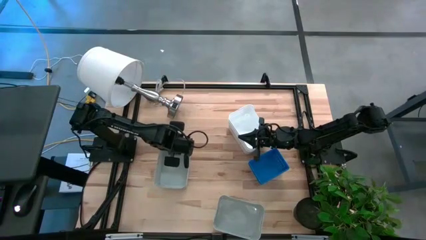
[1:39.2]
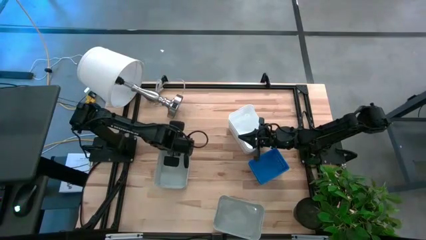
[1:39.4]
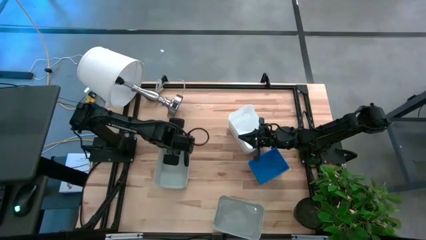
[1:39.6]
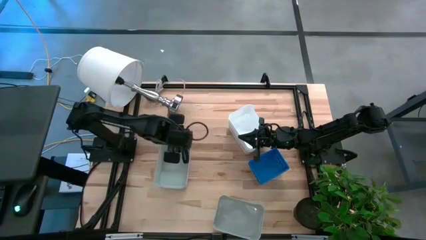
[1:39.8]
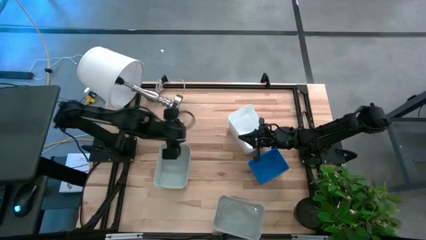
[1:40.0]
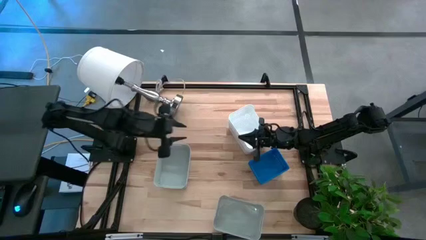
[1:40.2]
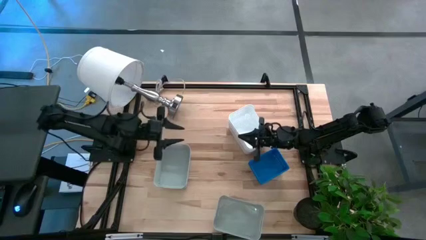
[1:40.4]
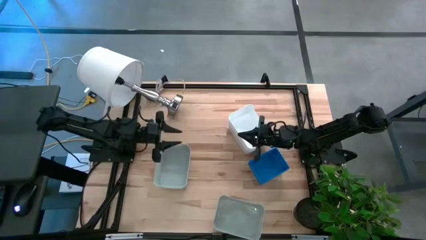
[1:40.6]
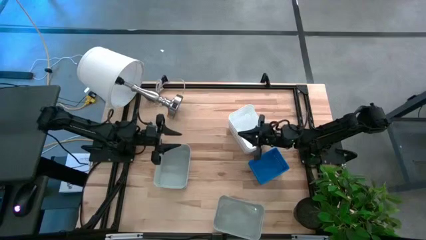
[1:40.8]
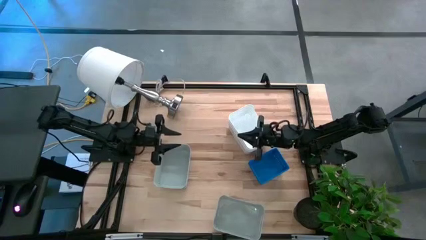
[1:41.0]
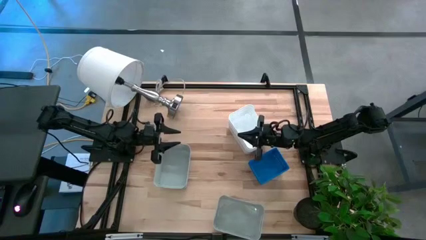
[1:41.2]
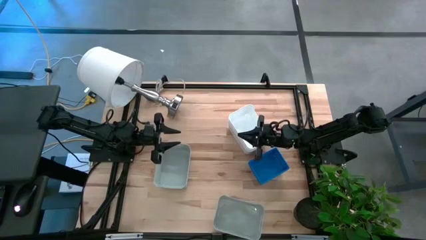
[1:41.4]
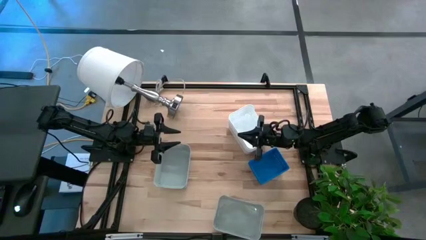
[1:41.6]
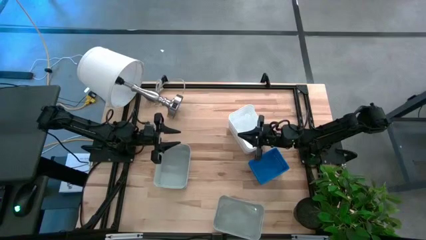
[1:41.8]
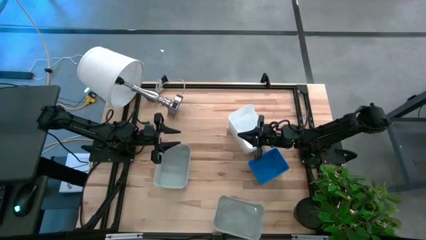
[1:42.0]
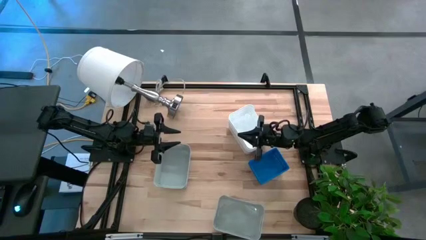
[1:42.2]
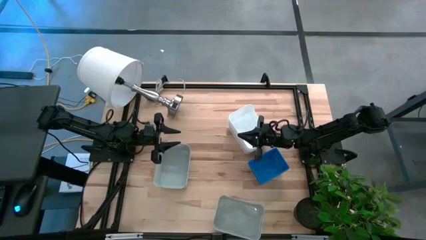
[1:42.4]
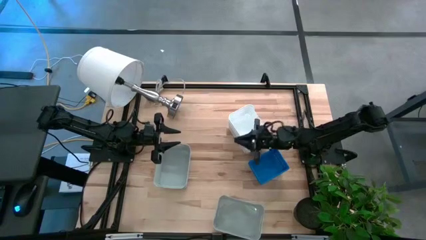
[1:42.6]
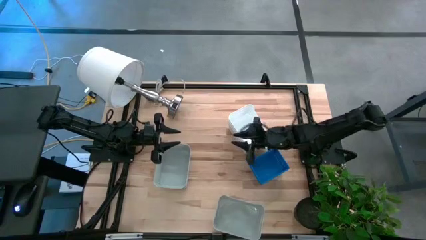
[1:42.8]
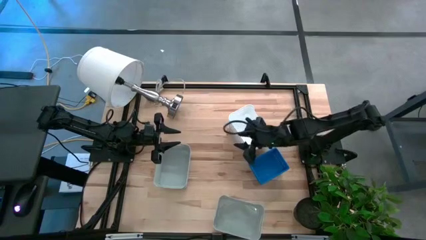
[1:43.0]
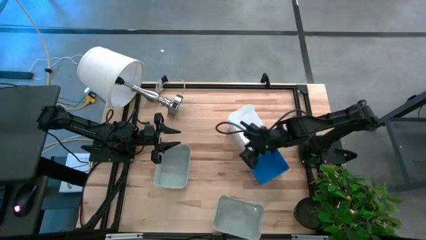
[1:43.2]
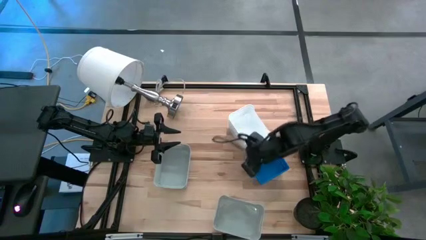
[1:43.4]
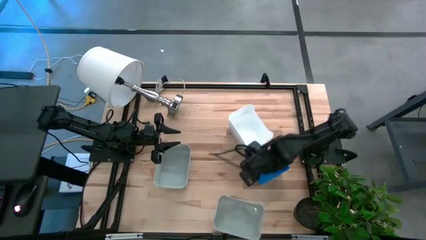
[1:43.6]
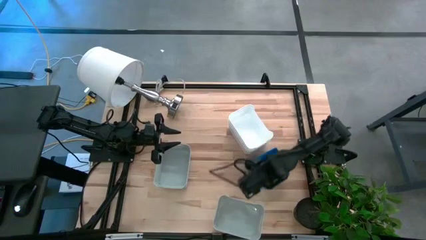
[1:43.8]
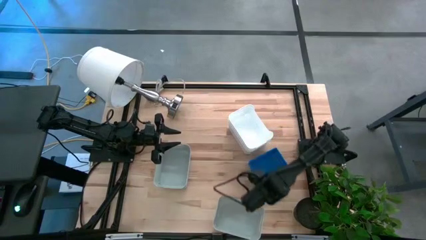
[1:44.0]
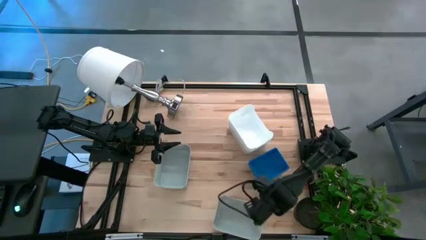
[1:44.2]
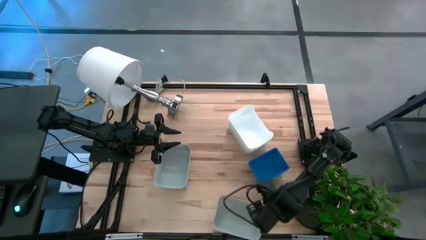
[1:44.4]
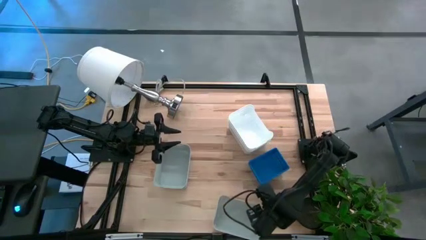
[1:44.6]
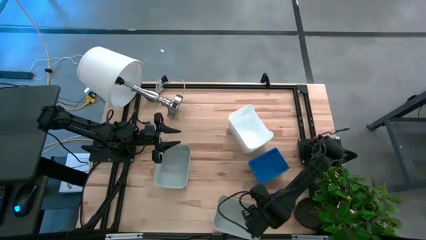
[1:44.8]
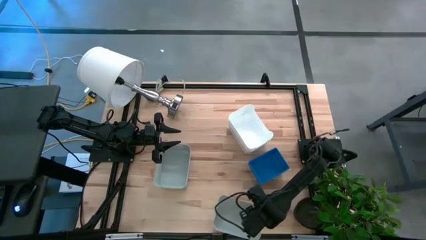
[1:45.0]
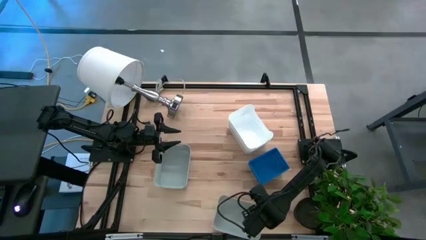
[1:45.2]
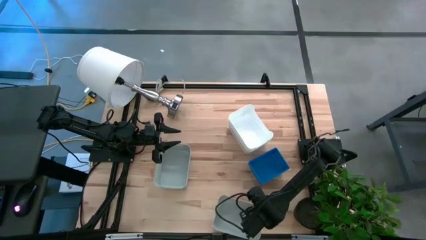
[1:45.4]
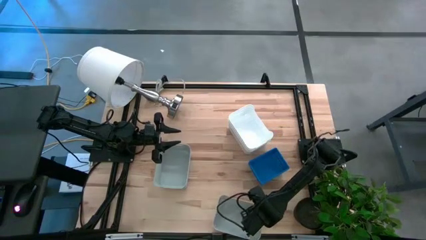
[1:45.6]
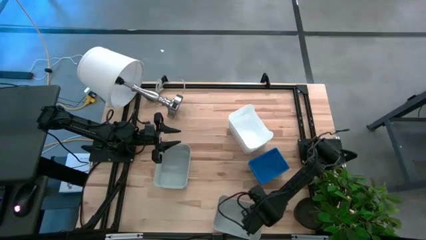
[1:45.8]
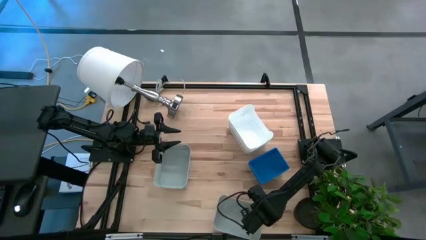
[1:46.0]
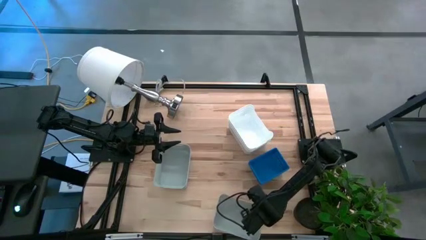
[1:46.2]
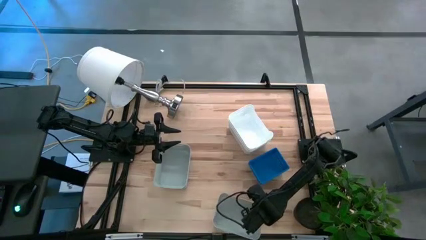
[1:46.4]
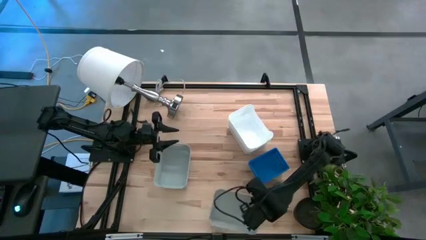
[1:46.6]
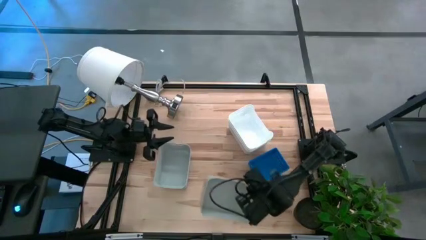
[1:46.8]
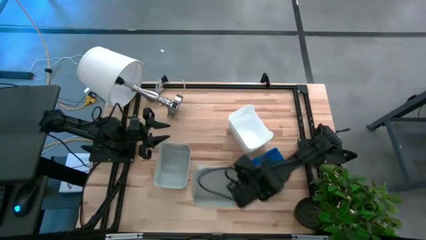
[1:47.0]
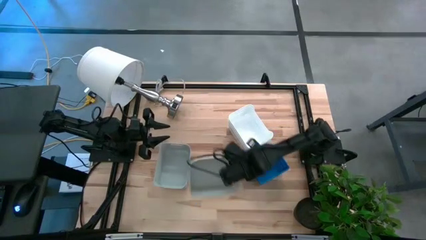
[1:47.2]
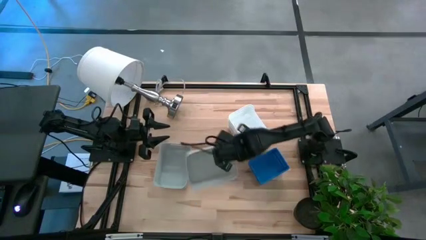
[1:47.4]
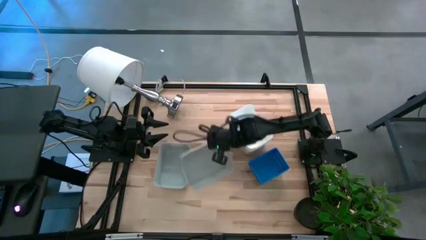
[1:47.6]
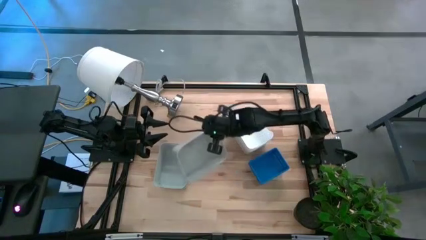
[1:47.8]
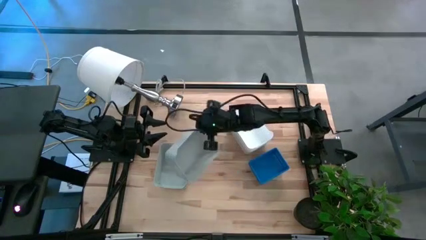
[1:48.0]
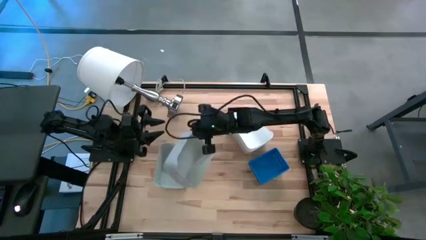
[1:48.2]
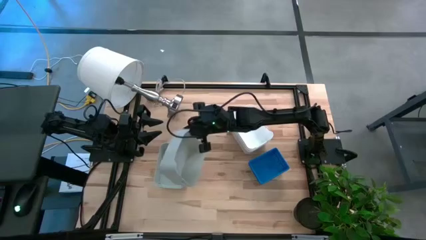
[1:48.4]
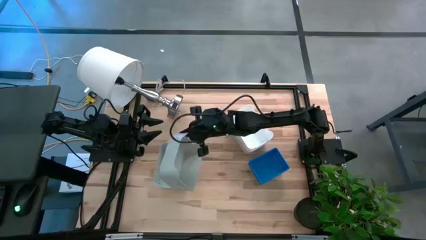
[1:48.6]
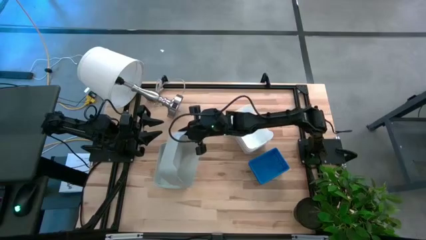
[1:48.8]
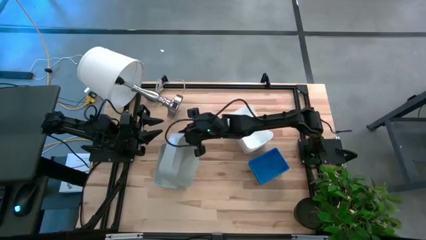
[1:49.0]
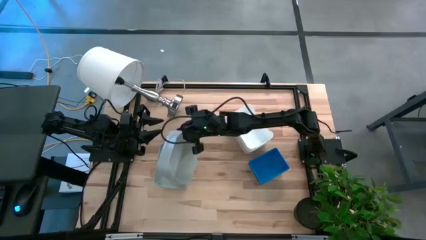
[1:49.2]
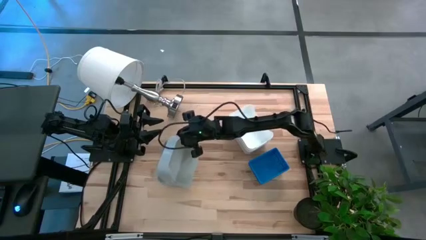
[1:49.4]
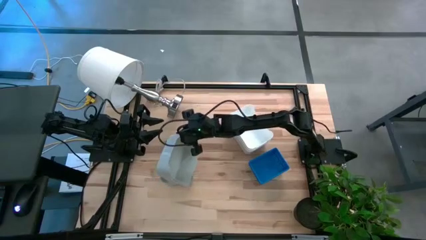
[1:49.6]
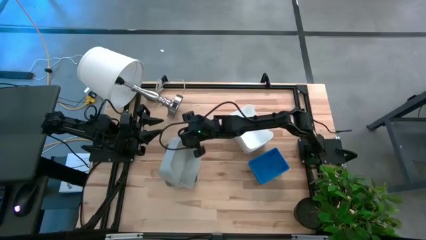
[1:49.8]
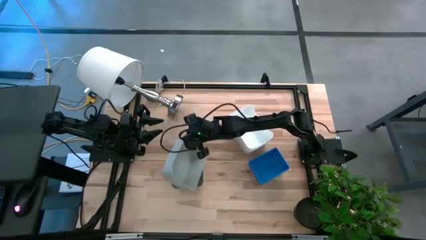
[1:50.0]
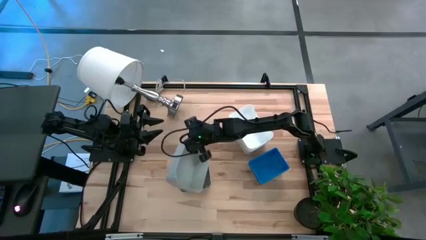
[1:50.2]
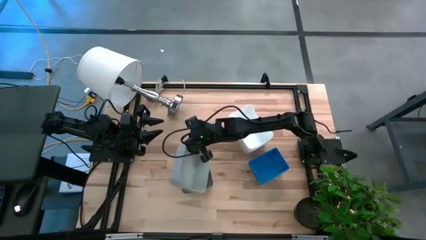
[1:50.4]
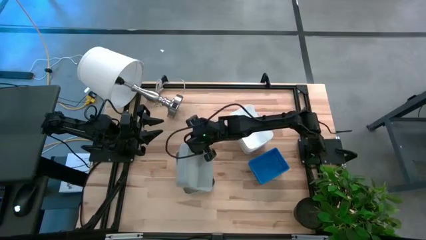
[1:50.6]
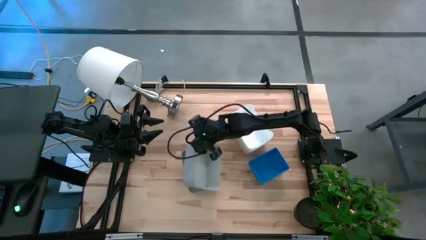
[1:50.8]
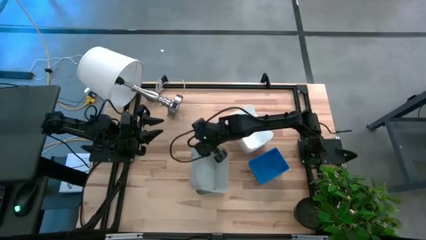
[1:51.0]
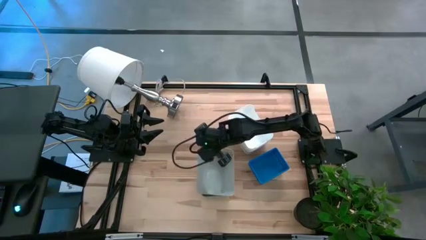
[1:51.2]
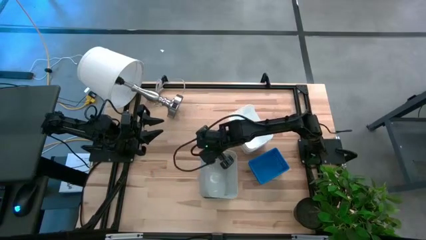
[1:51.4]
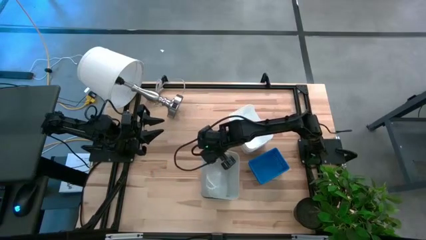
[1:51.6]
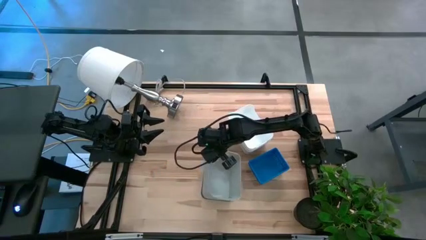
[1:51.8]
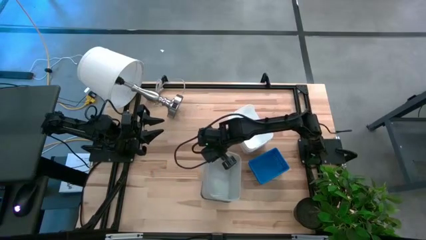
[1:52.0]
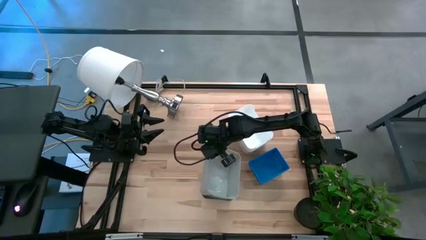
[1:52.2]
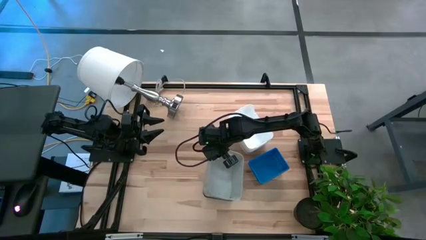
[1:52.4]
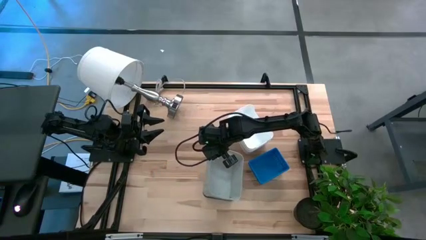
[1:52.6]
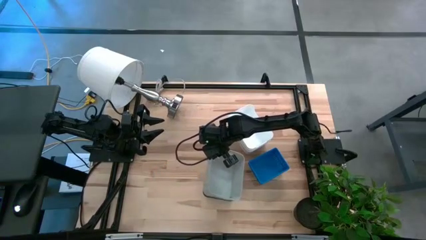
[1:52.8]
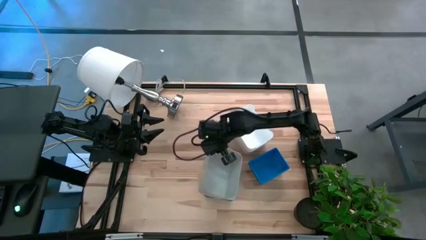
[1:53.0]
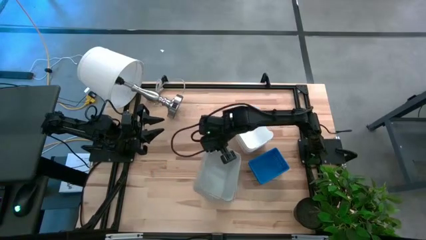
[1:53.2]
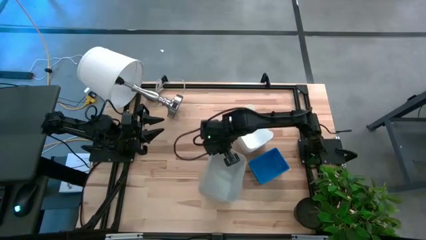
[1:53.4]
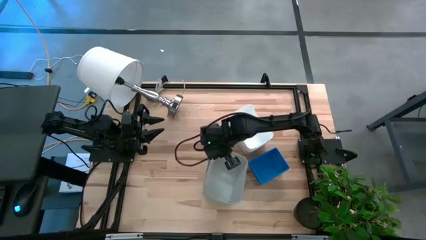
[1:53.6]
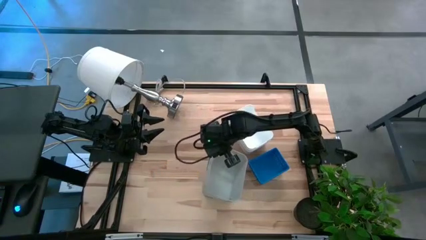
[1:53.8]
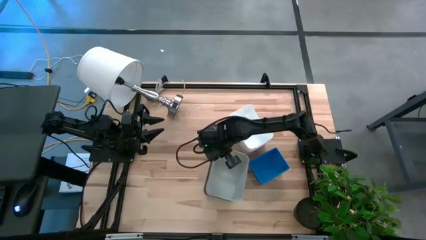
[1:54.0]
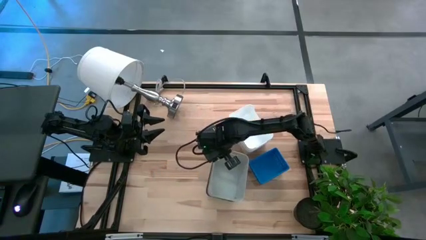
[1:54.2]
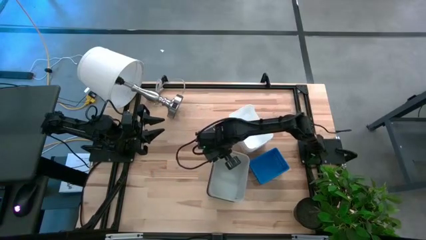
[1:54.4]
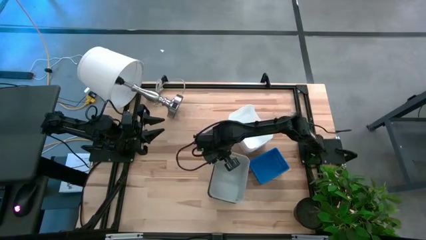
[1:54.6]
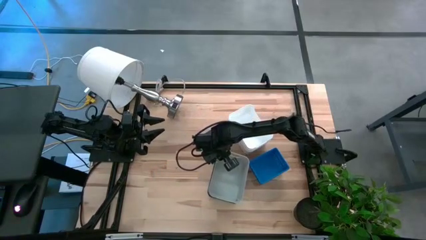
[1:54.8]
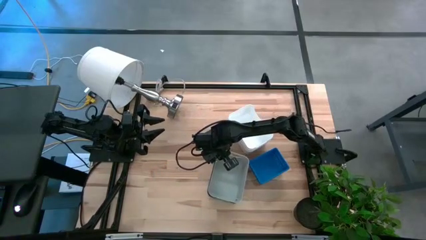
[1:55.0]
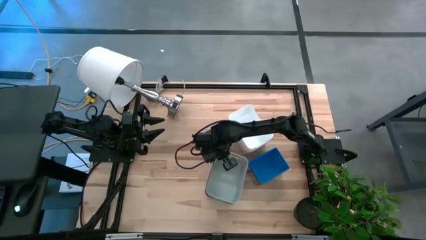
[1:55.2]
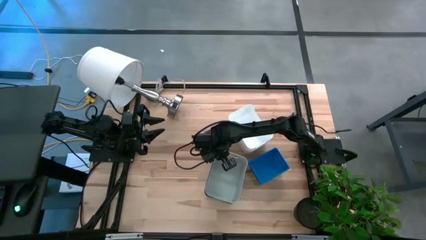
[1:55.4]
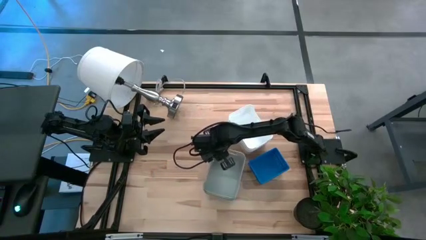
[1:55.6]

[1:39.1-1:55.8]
Stack the bottom gray bin on top of the gray bin
